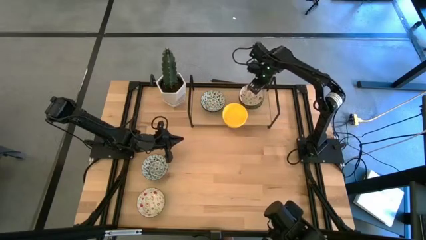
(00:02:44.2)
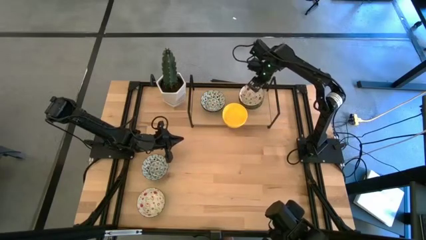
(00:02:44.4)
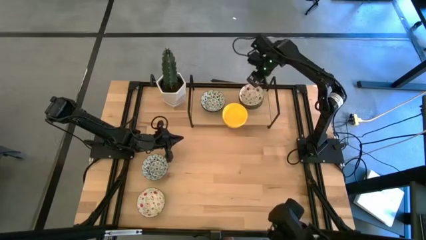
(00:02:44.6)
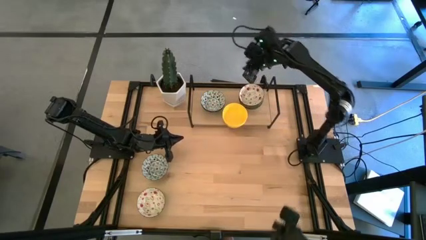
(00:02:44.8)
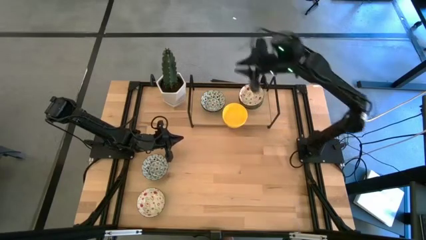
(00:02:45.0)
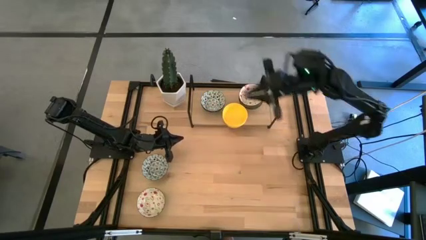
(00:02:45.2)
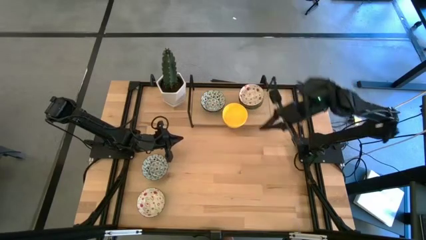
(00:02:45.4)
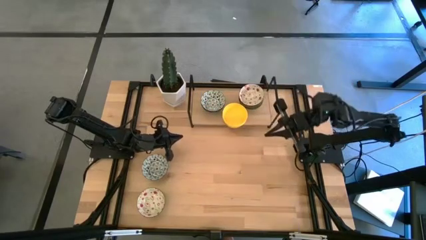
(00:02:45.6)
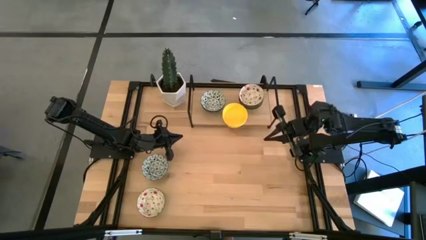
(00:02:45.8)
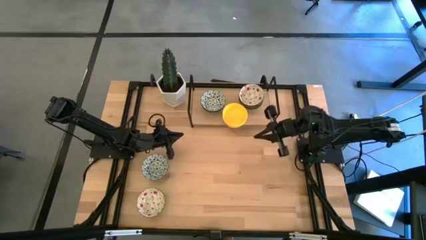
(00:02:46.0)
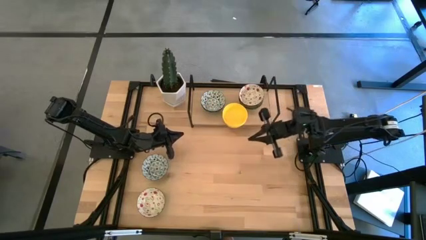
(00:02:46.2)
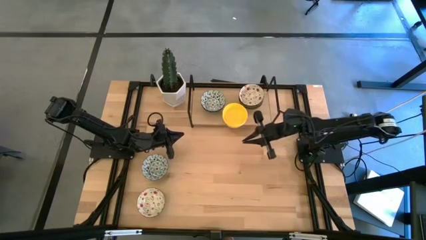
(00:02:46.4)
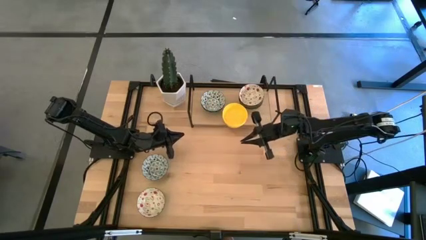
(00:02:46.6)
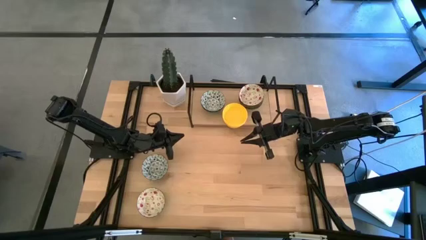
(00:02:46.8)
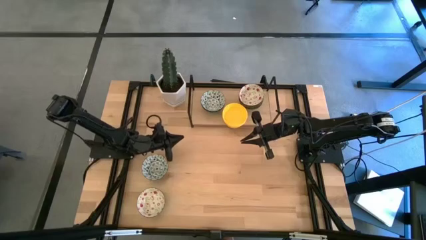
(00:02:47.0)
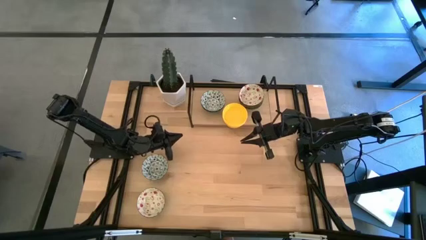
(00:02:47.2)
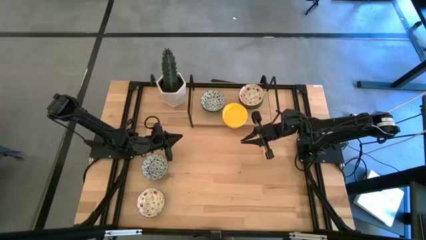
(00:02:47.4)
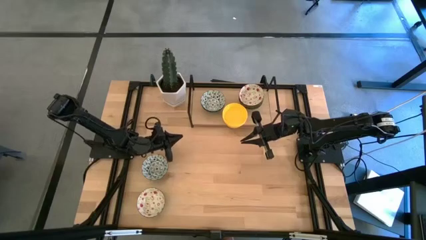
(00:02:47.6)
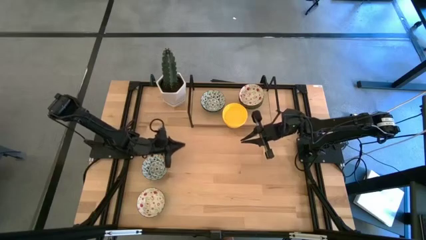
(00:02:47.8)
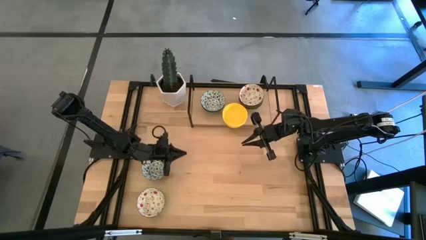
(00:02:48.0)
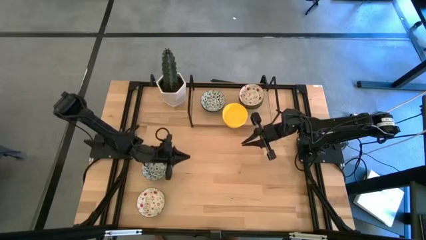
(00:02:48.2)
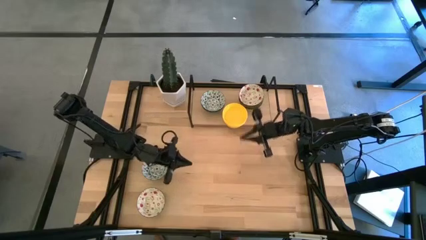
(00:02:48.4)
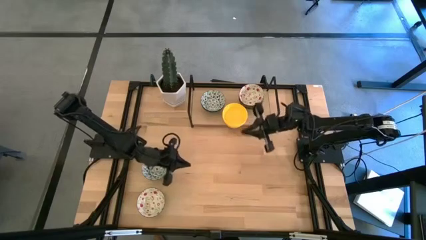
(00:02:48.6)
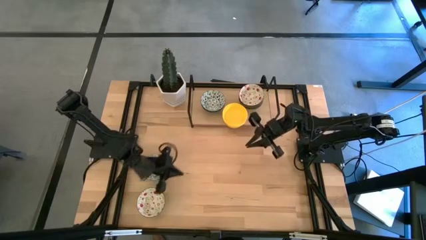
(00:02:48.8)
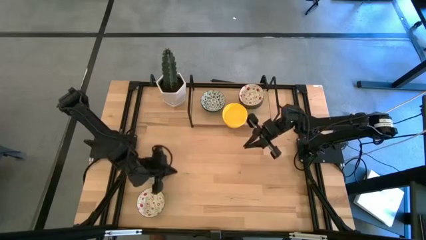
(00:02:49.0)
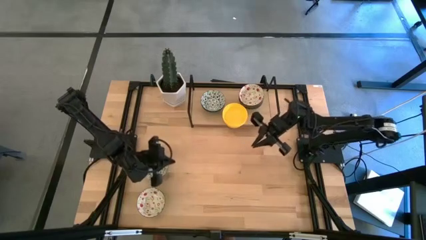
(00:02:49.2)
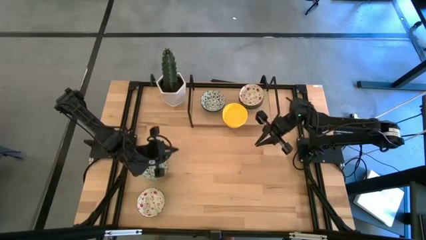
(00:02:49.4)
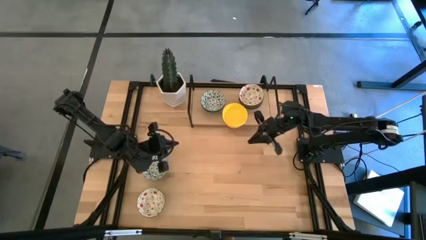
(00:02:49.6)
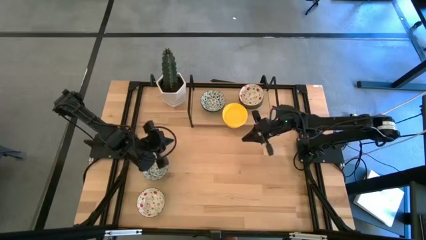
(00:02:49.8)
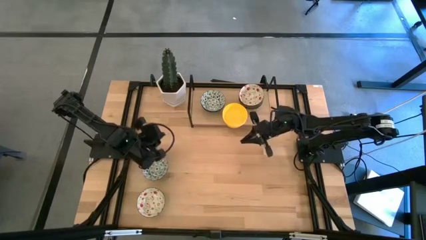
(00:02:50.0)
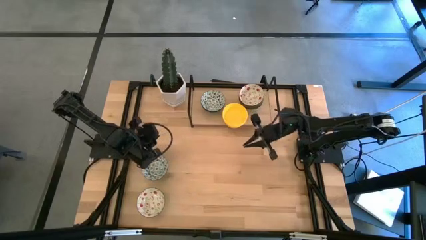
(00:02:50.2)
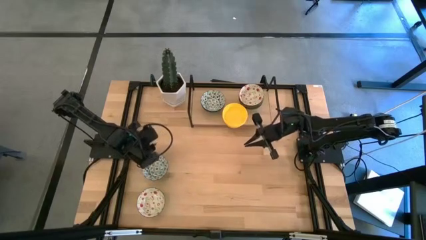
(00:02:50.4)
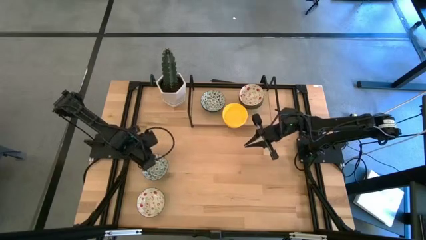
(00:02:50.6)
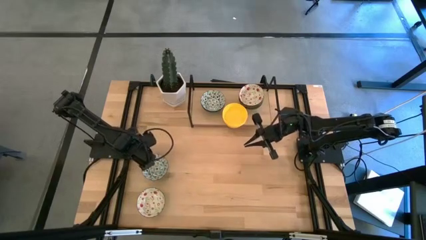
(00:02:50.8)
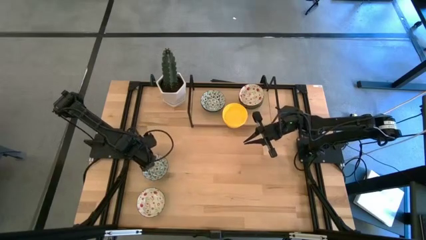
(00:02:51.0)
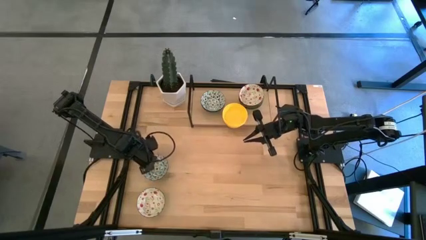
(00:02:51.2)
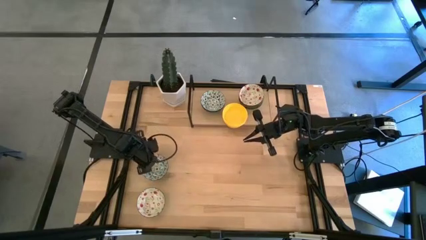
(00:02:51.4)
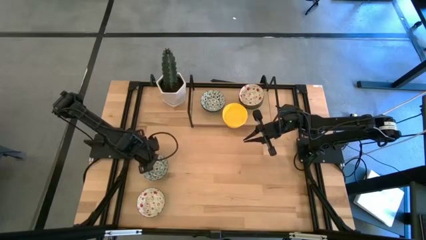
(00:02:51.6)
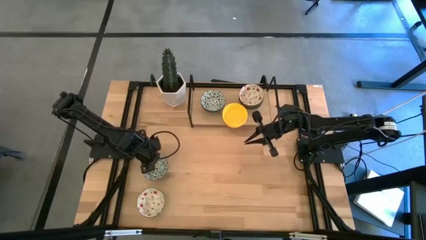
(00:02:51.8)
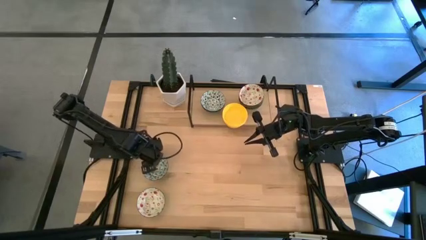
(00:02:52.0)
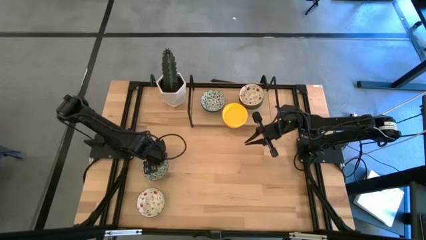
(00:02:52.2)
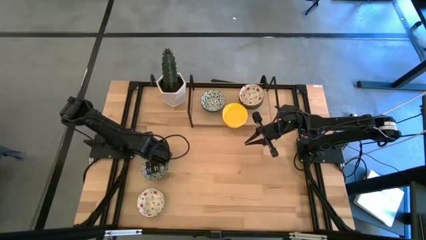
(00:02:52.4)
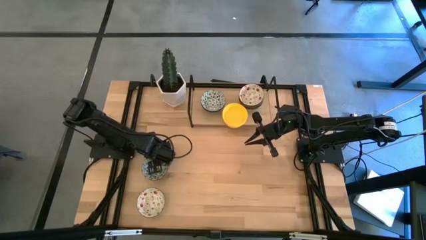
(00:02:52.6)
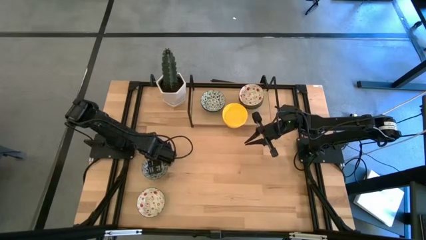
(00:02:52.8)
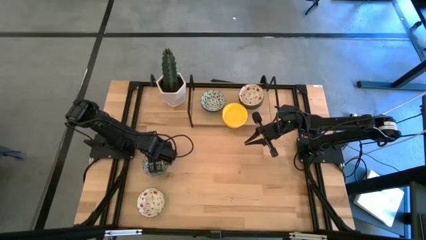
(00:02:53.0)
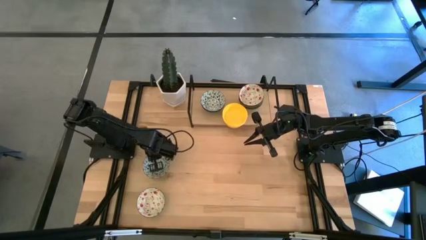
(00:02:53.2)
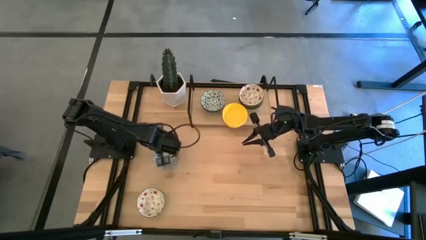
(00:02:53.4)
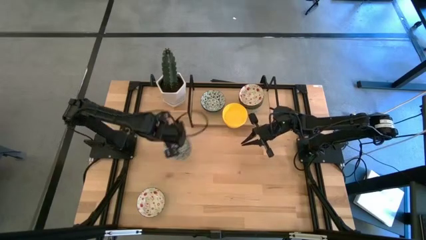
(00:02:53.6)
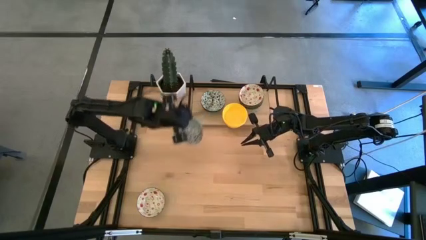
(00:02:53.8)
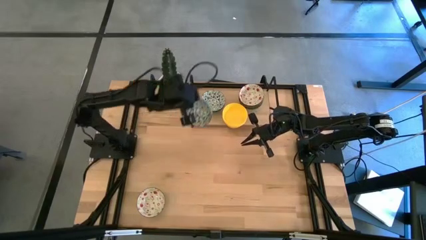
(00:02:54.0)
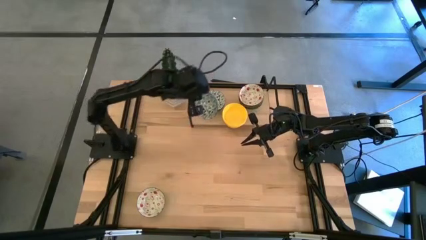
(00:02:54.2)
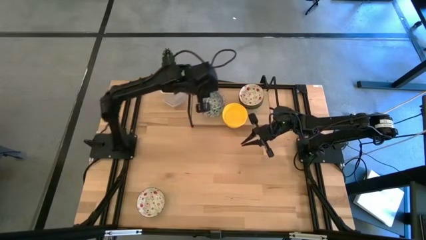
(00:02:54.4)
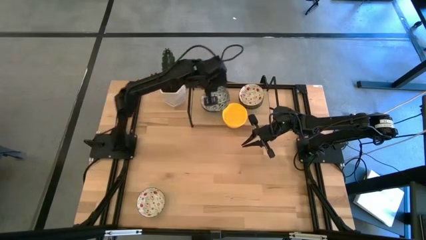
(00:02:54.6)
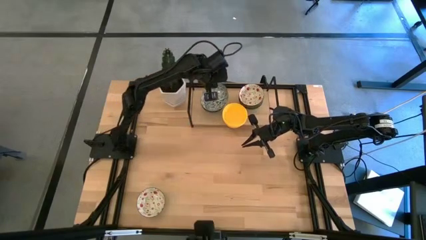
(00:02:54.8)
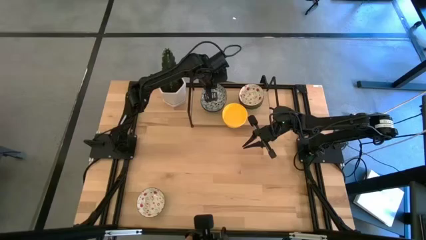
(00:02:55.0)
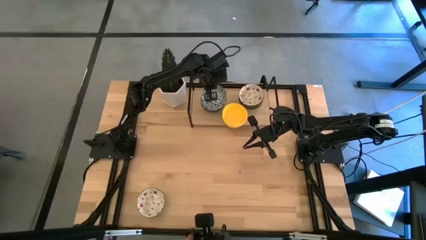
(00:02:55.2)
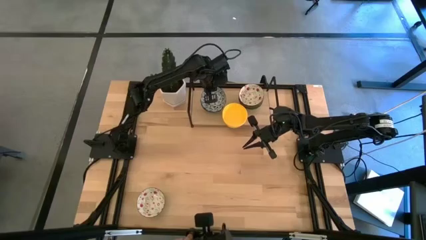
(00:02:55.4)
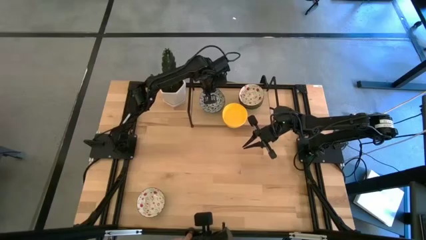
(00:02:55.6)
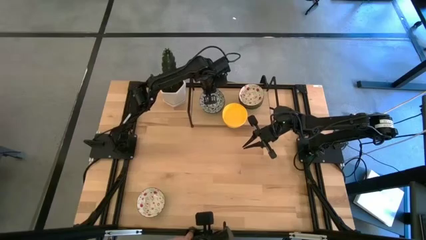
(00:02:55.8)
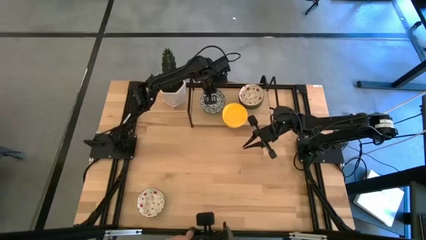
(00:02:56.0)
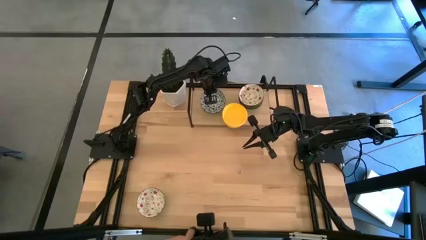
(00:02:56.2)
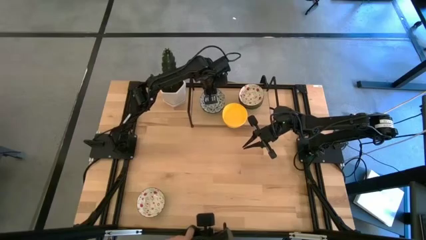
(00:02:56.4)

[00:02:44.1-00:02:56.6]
Task: Pick & Place Mini bowls
Stack the blue printed bowl on top of the blue printed bowl on the shelf

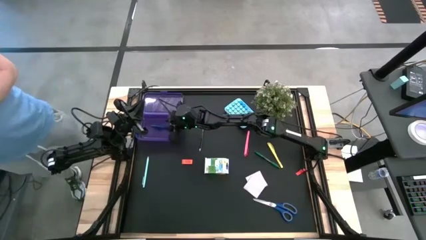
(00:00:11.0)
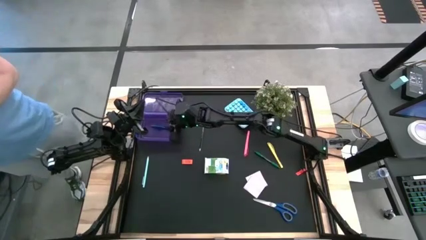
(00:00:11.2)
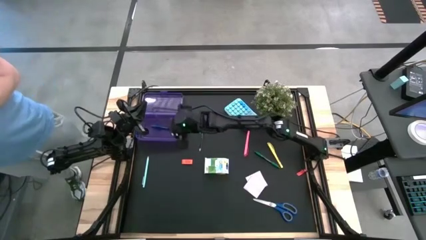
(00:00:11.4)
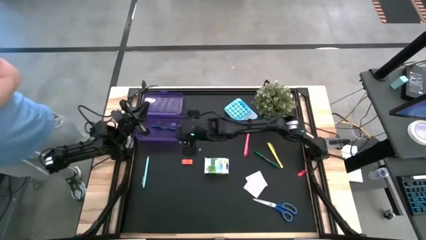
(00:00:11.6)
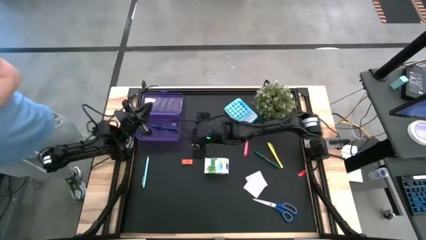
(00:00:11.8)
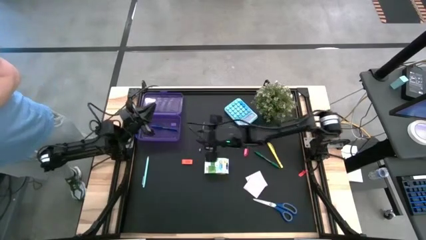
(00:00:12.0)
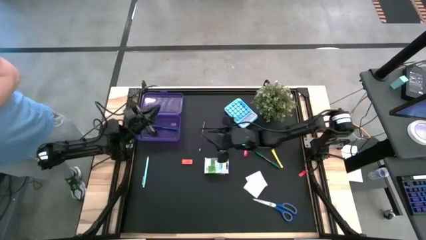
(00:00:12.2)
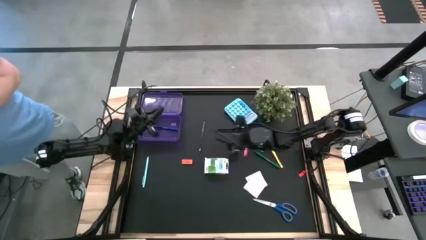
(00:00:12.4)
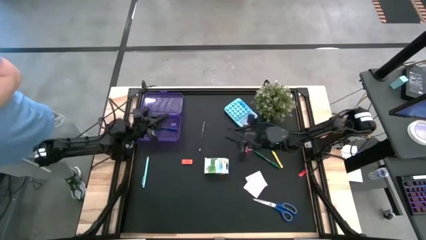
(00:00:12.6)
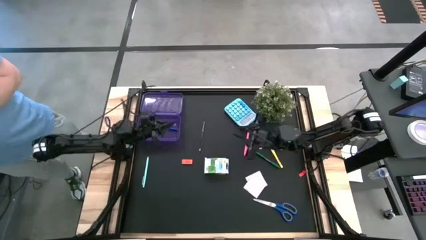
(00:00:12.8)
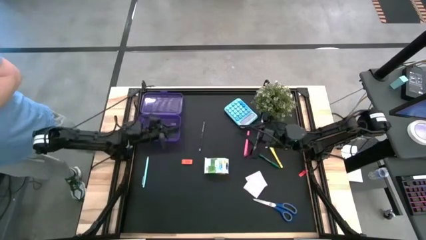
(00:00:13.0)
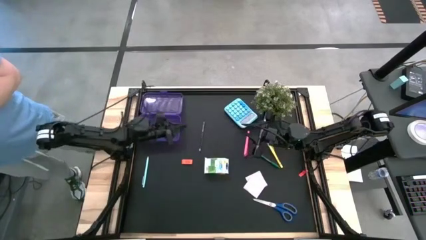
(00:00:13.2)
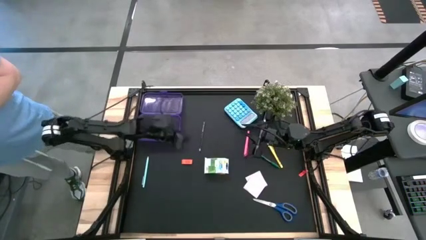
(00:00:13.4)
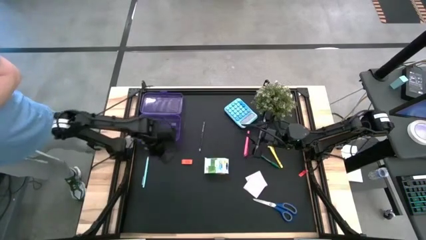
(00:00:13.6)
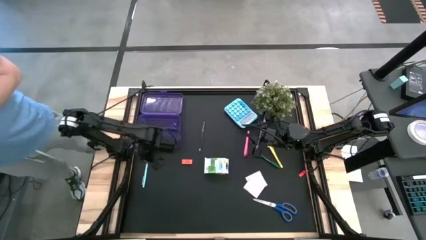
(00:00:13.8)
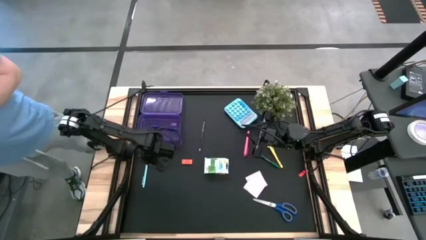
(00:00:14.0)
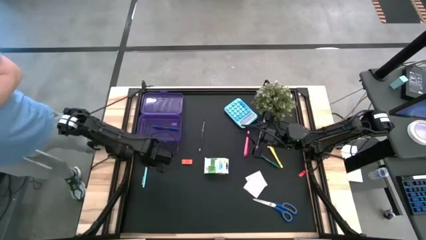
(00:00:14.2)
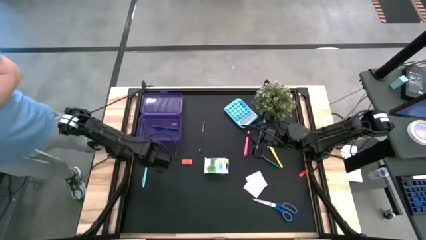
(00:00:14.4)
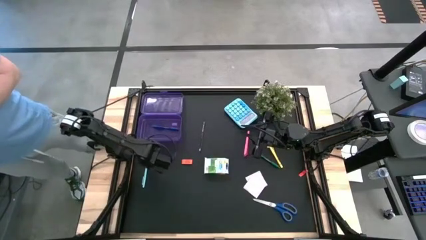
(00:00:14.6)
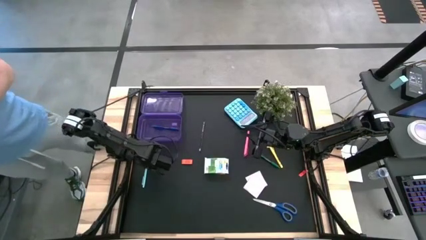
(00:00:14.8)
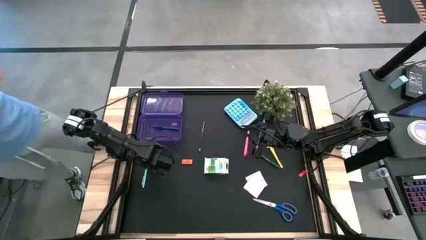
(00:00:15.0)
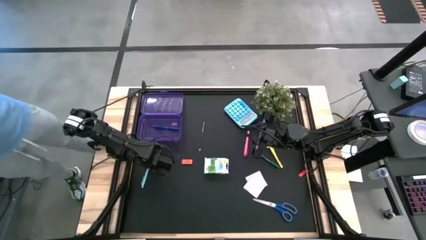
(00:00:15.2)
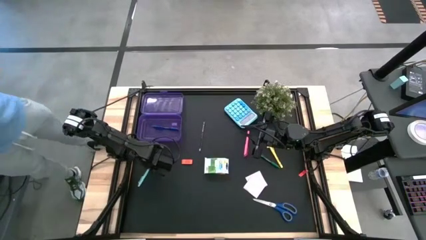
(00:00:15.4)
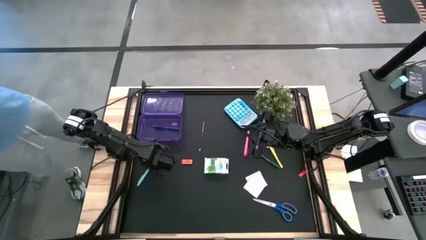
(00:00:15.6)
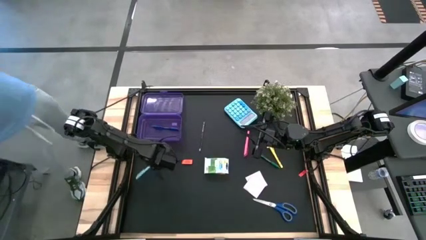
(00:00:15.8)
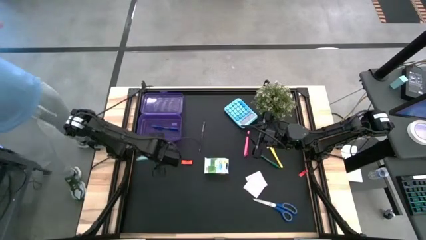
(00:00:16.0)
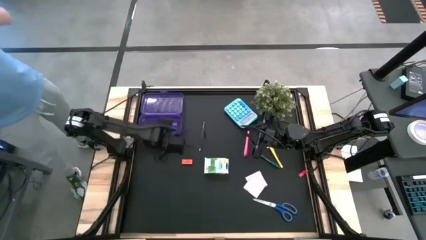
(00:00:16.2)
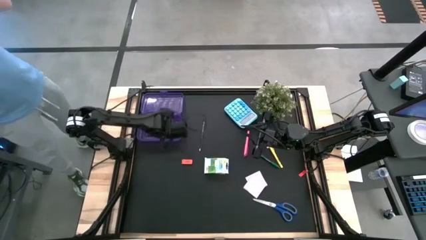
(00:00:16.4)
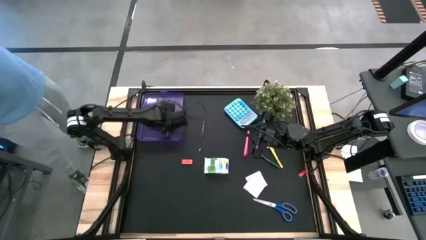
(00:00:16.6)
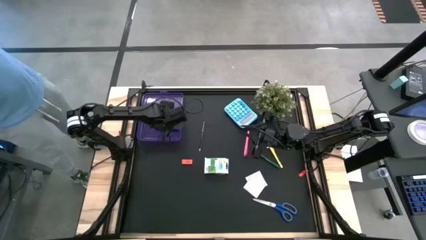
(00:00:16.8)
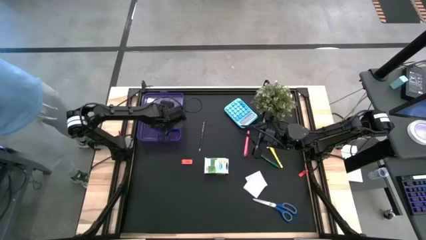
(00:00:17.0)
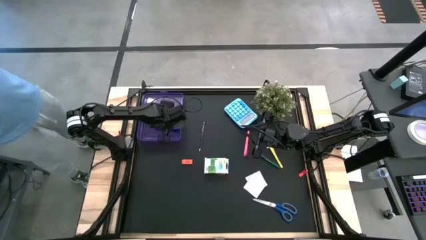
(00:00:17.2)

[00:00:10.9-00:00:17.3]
Task: Pack school essentials
Put the light blue pen into the purple supply box
